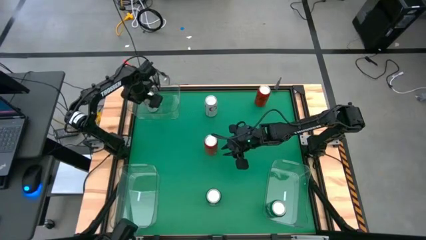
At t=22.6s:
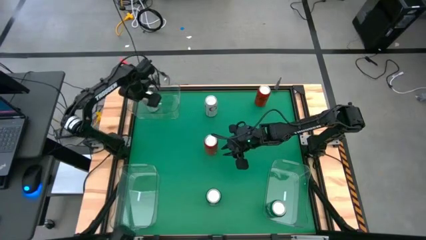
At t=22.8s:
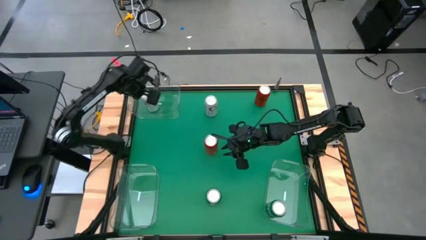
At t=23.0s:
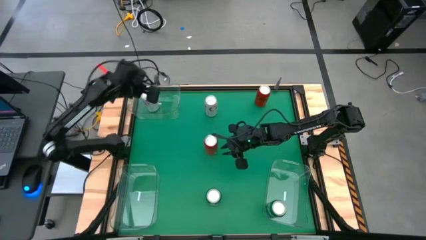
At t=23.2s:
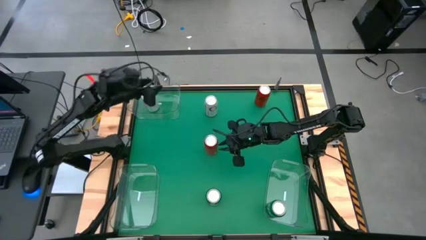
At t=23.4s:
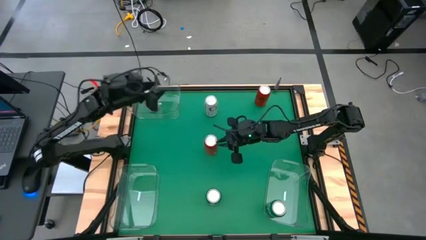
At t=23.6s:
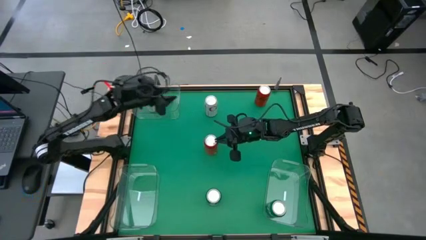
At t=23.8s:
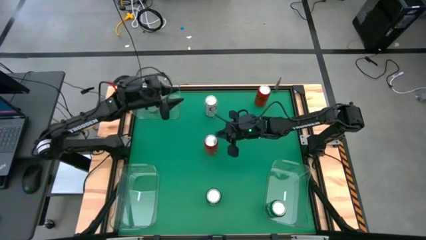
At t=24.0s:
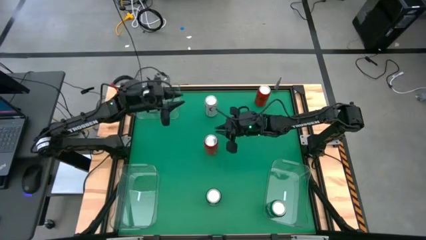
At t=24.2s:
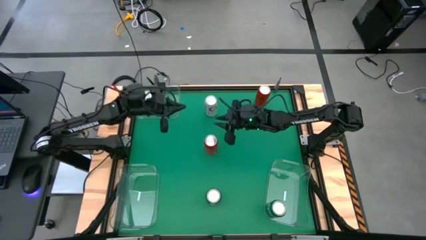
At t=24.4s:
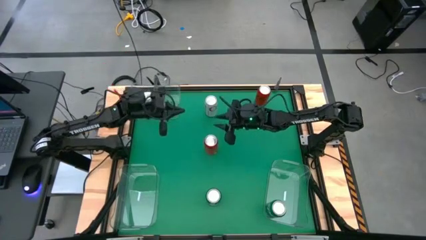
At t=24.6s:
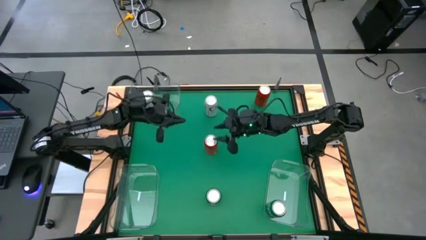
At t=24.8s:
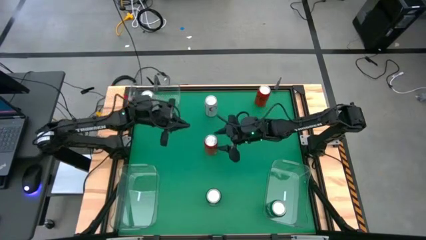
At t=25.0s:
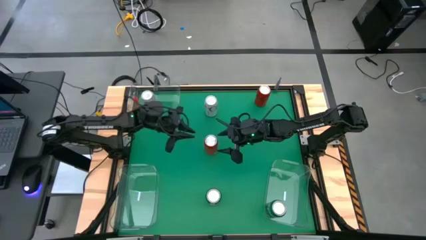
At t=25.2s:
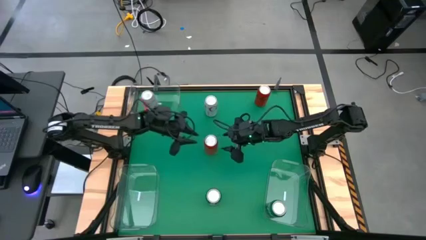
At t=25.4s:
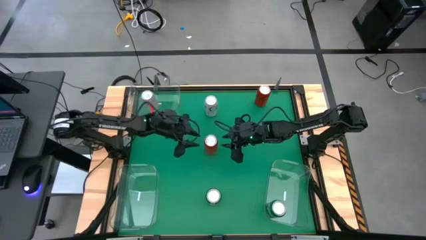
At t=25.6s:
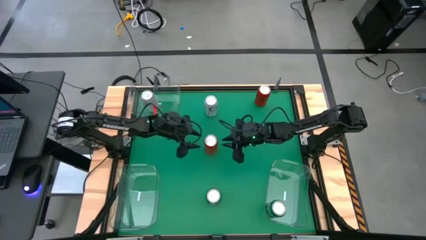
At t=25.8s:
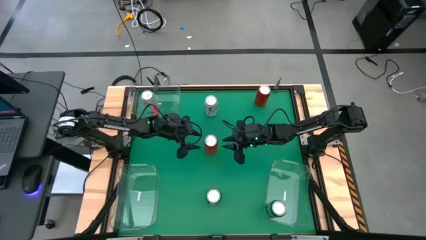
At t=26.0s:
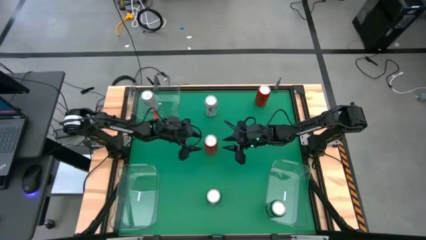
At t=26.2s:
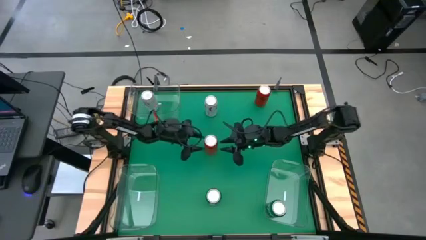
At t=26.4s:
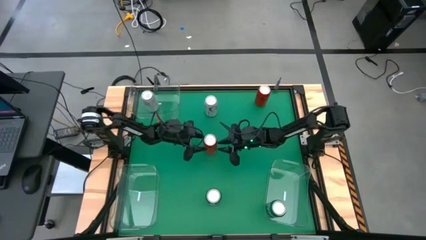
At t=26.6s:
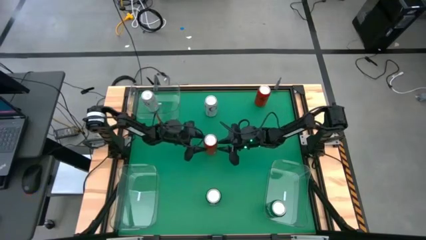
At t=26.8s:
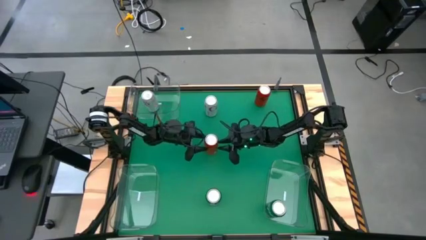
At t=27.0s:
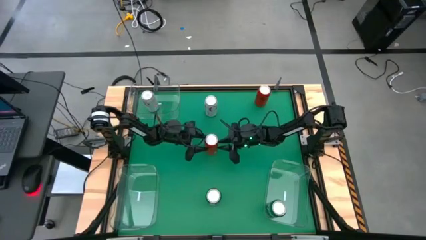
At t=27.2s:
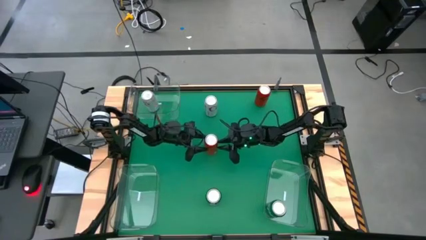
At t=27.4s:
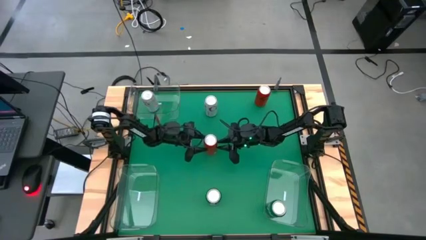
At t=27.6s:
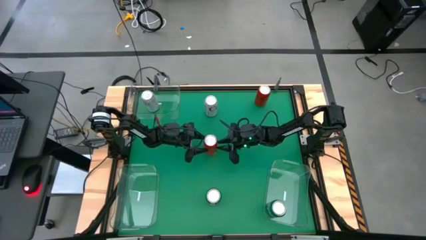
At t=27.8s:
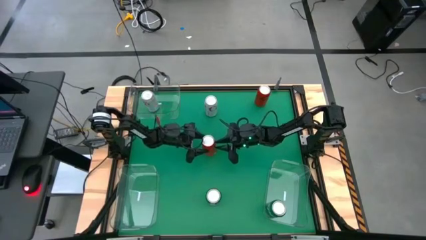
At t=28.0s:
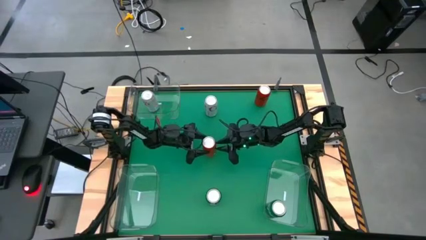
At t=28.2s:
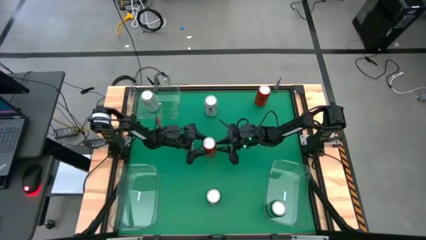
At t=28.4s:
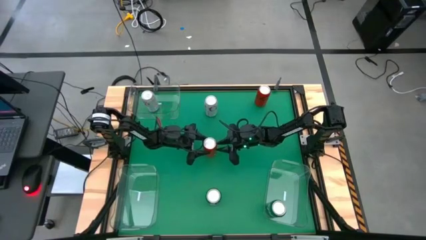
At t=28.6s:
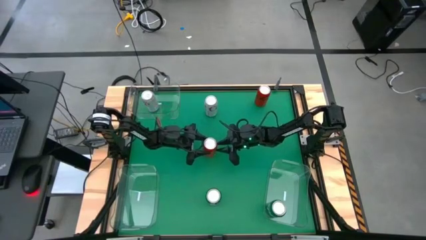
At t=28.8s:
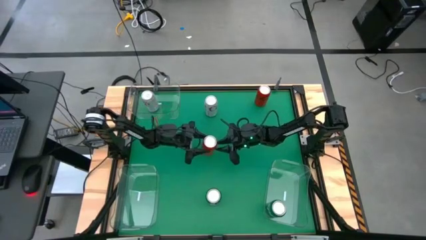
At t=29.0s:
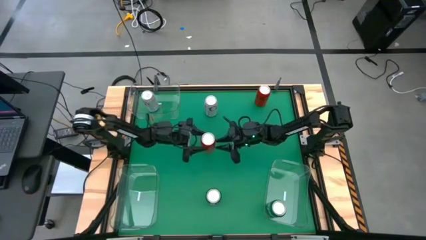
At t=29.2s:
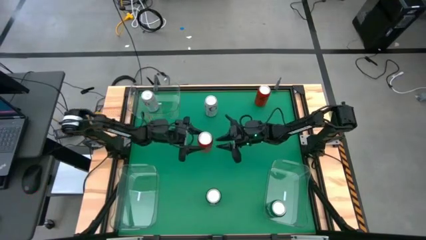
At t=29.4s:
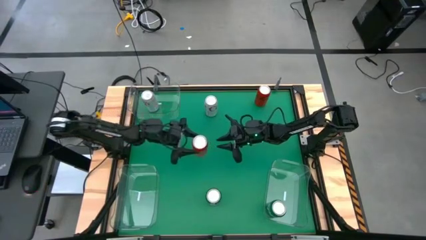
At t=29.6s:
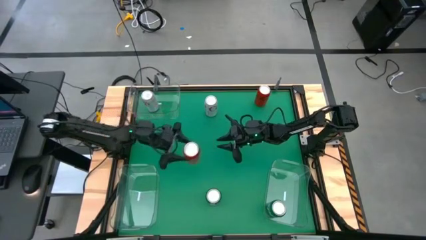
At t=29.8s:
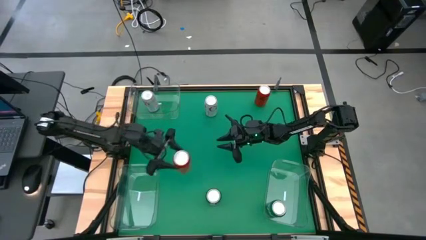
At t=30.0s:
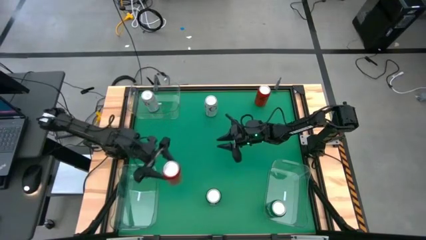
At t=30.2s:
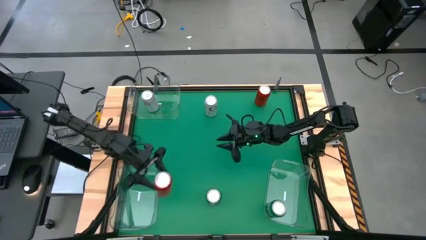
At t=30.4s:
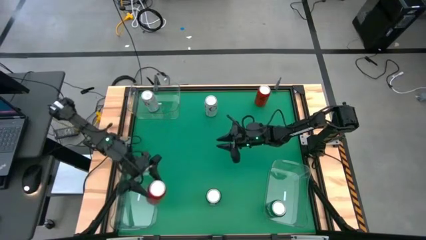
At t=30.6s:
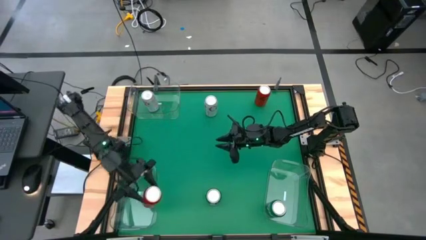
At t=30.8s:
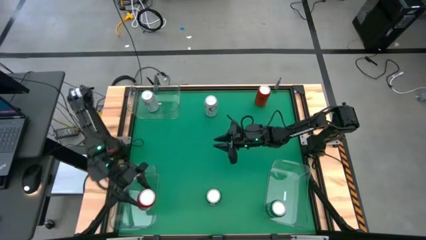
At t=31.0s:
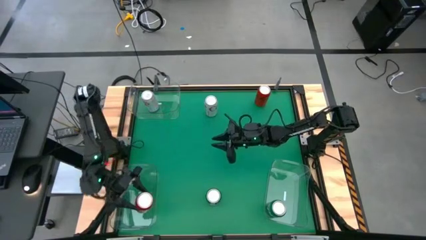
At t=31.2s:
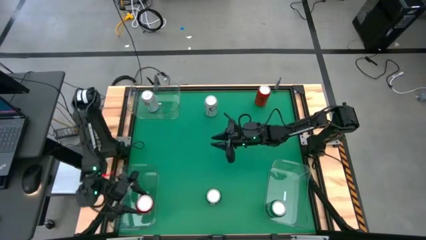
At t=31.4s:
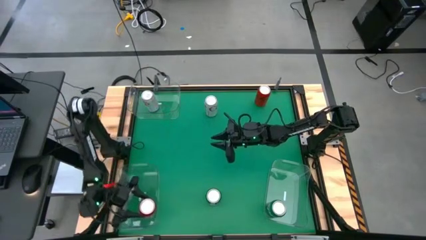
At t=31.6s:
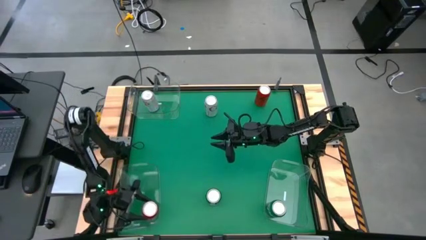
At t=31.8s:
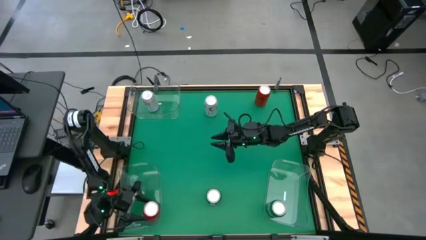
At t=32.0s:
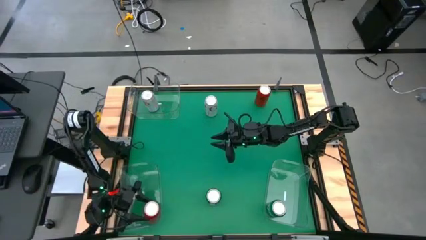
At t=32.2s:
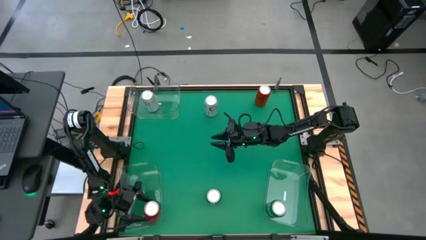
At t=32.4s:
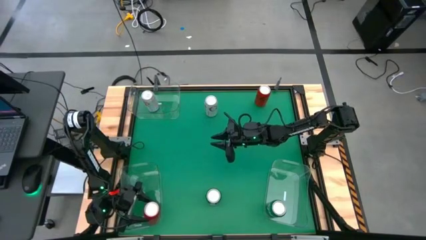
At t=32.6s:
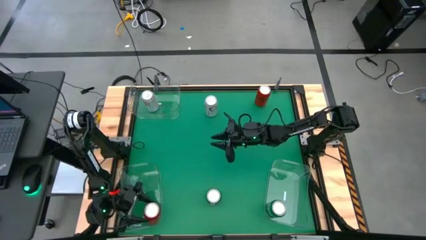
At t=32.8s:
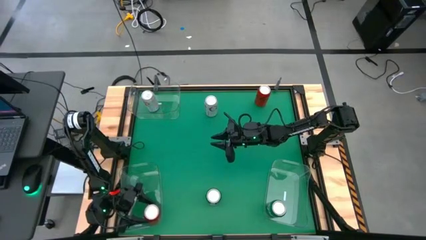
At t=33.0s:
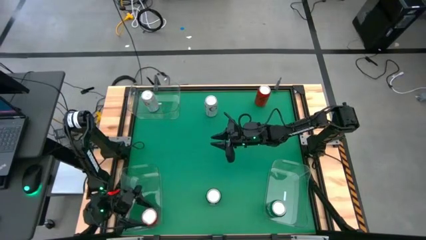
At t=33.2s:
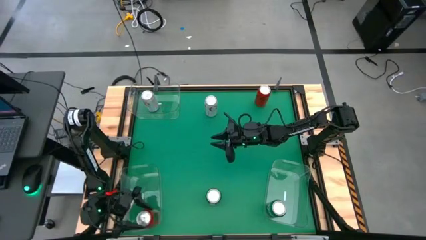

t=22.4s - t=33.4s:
Task: Sort soda cans
Put the left red-black soda can into the bottom left transparent bin

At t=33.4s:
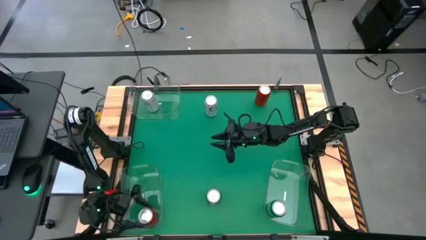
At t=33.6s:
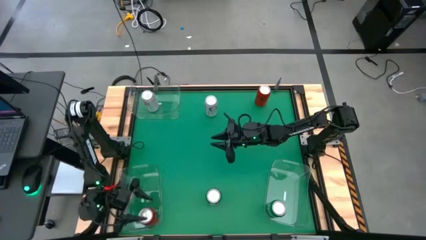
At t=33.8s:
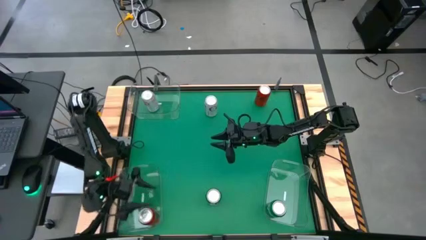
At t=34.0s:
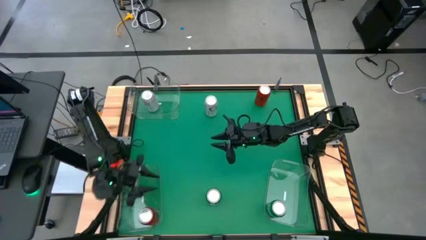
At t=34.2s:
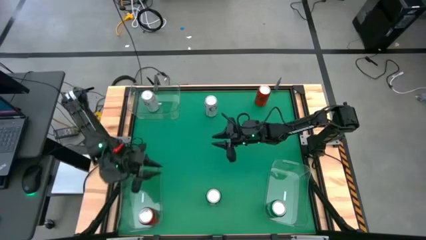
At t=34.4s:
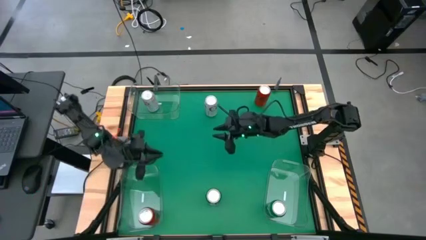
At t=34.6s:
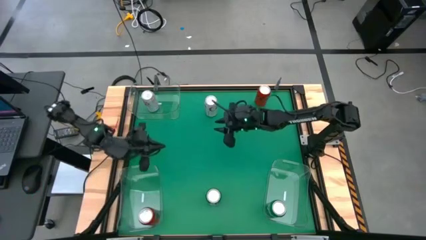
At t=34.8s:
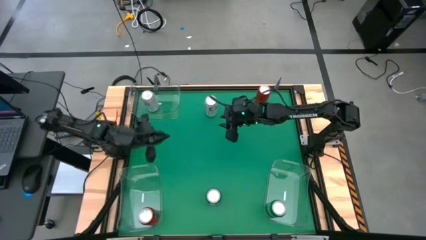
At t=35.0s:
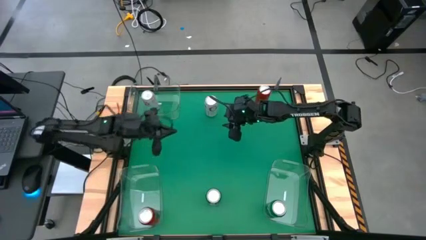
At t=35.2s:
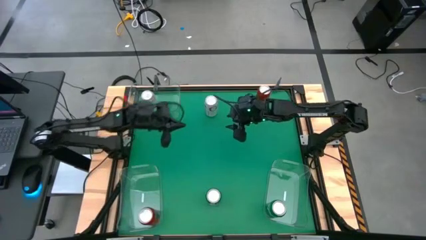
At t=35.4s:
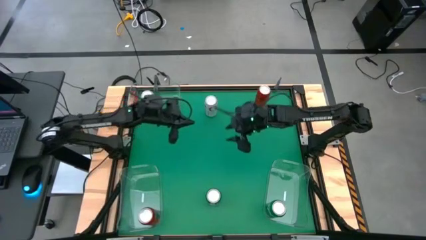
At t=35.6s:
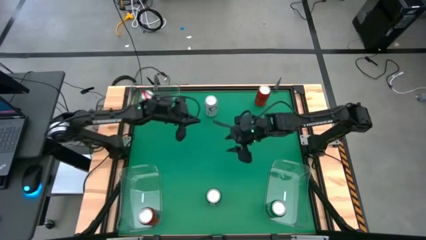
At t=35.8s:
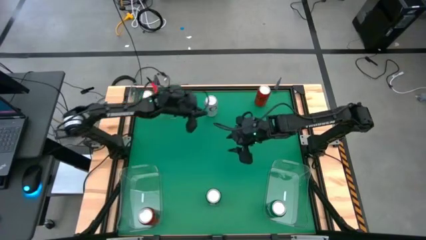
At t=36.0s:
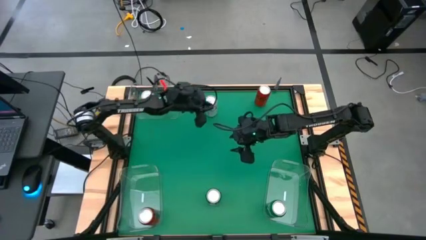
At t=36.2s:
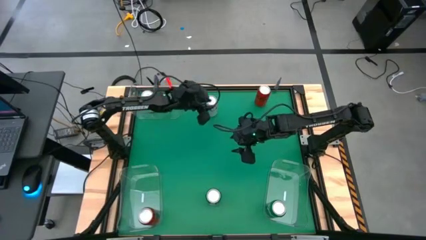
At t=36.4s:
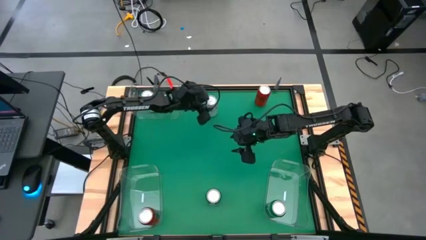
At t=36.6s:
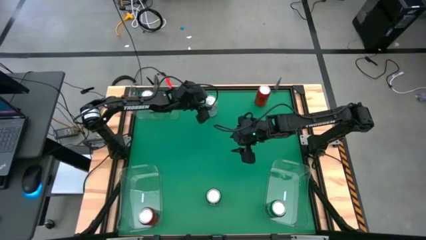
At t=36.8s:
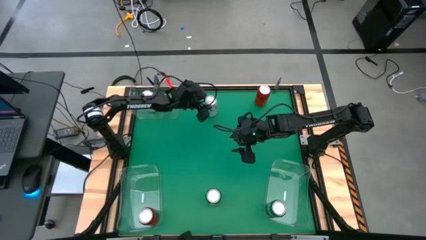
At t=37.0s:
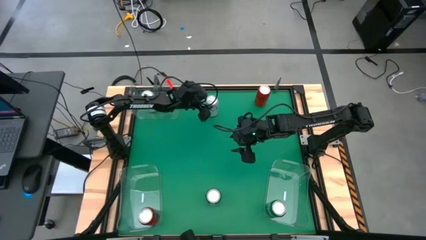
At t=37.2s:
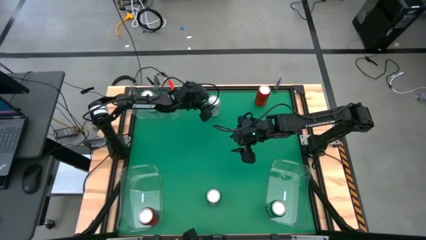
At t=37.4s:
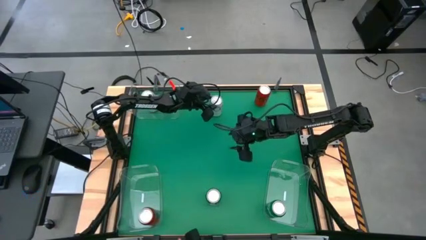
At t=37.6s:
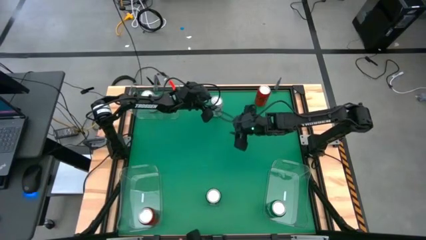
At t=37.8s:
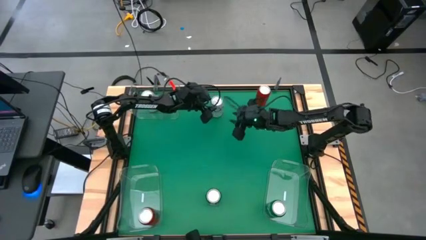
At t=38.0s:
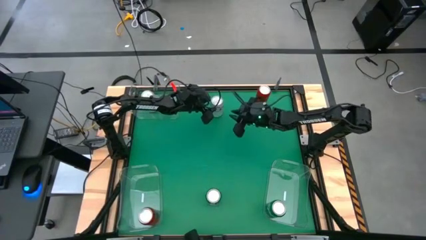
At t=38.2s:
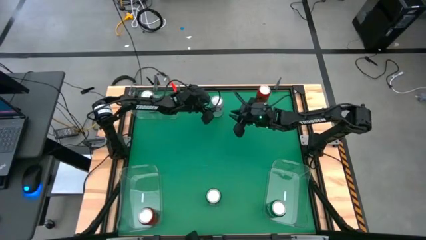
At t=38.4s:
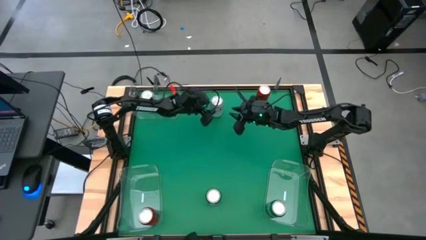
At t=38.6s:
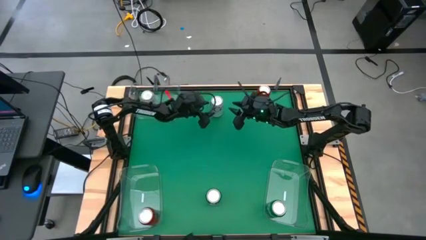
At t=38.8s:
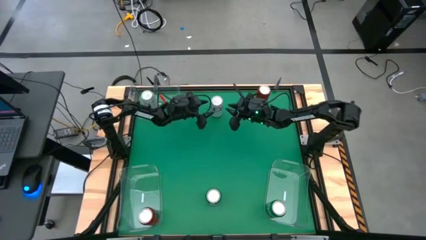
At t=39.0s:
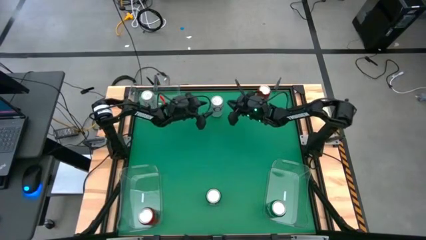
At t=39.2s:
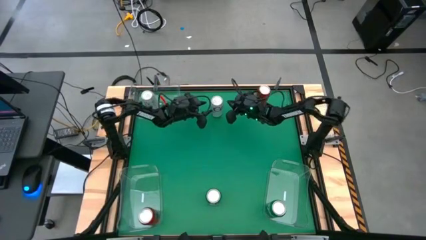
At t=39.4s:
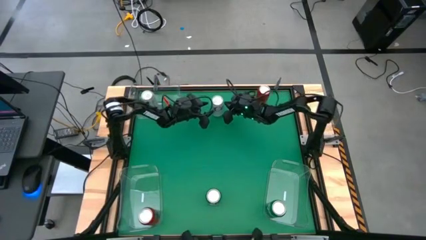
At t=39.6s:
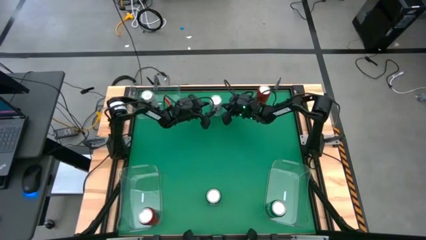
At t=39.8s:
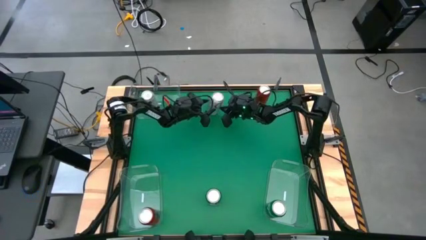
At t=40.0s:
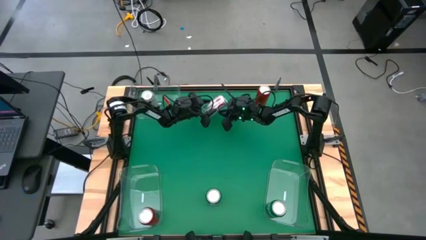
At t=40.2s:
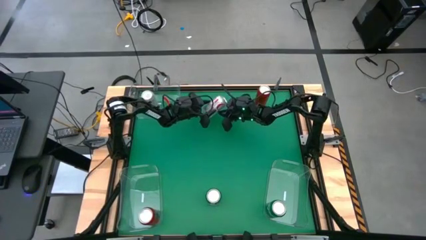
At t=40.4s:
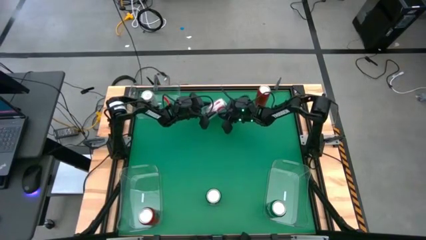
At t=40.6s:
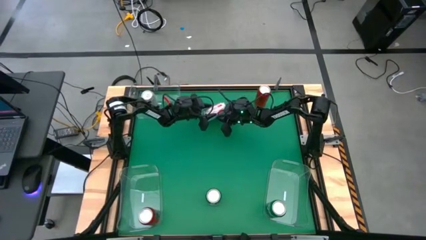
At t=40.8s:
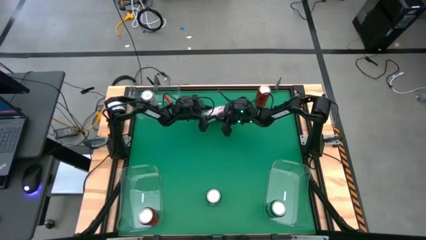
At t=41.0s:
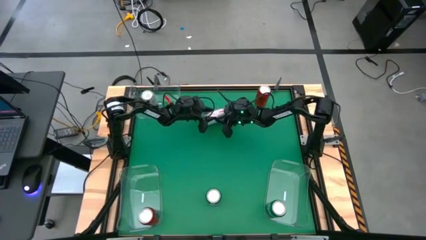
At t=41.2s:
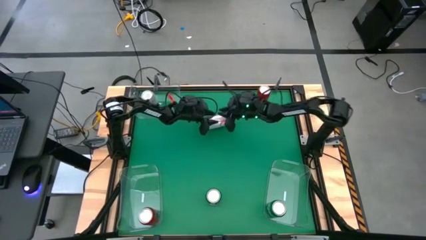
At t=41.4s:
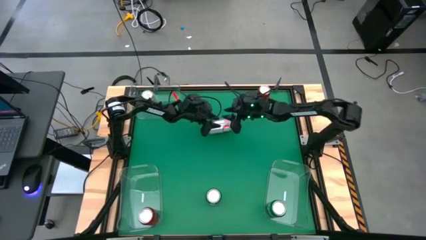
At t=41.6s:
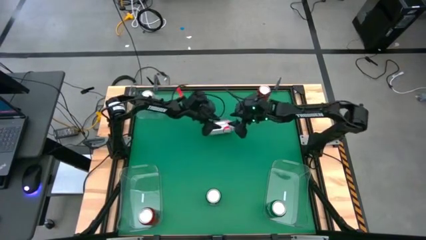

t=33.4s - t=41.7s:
Put the red-silver soda can into the top transparent bin
